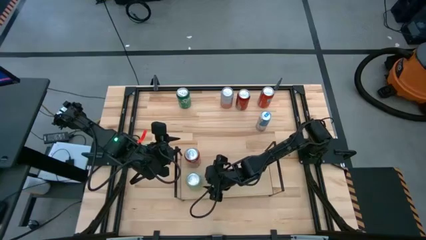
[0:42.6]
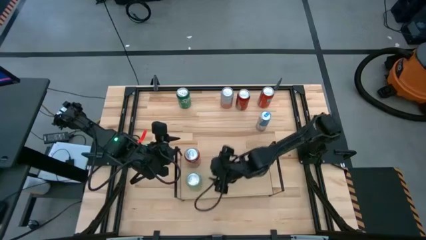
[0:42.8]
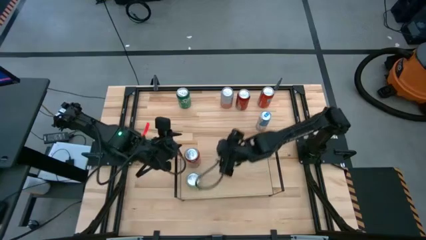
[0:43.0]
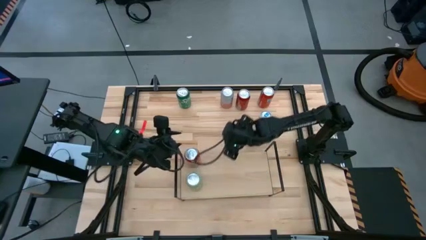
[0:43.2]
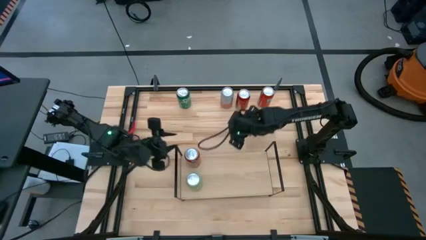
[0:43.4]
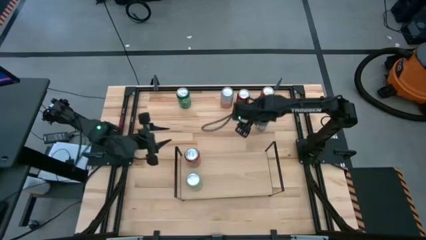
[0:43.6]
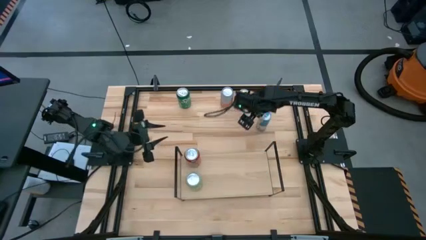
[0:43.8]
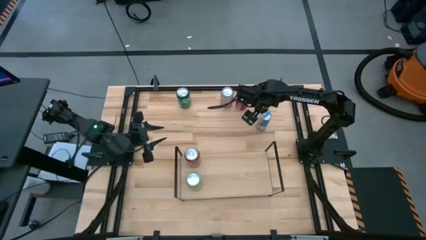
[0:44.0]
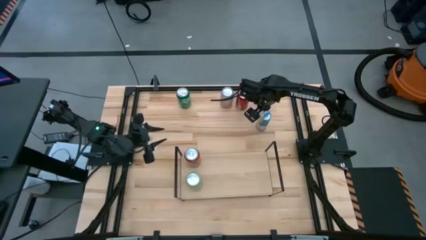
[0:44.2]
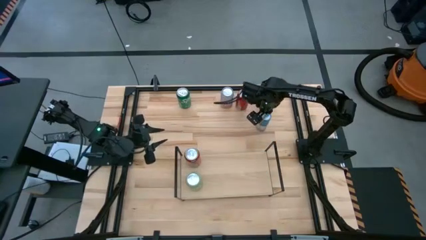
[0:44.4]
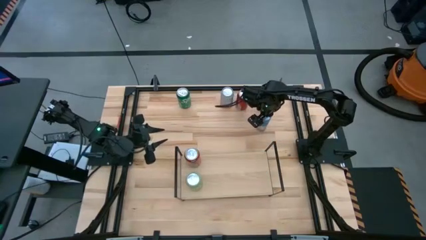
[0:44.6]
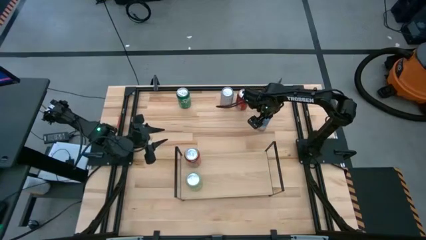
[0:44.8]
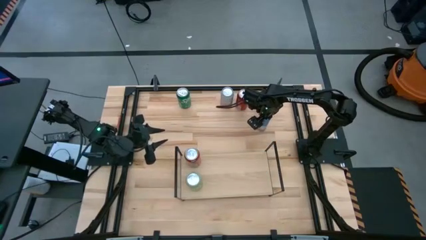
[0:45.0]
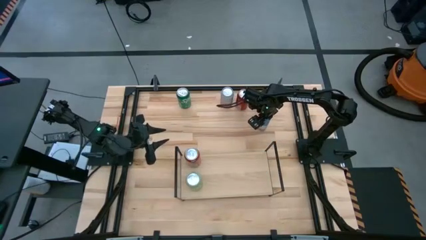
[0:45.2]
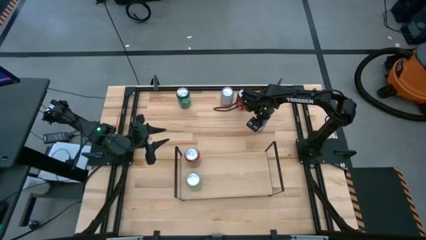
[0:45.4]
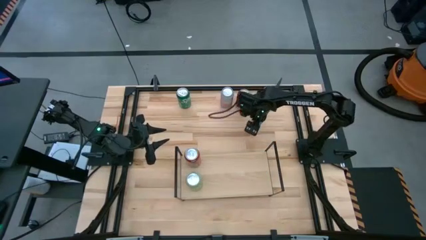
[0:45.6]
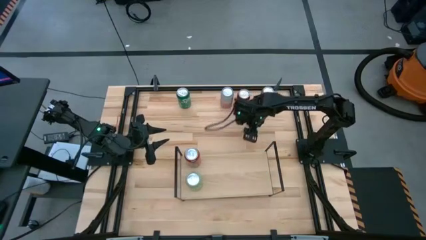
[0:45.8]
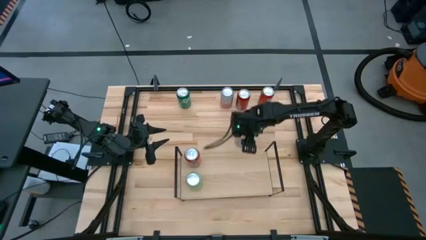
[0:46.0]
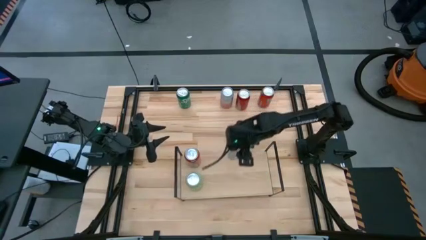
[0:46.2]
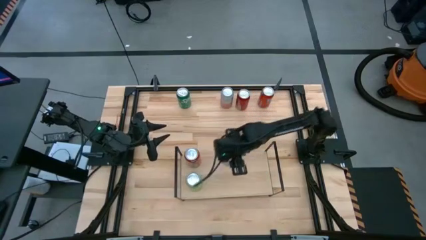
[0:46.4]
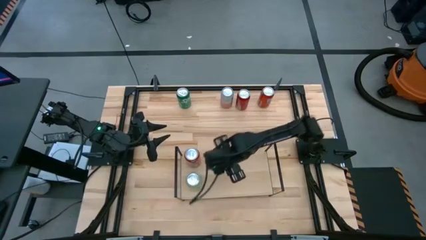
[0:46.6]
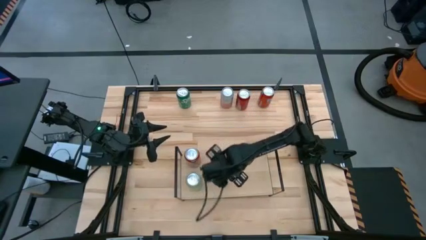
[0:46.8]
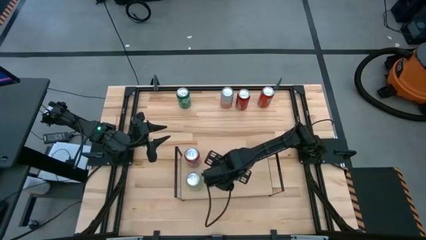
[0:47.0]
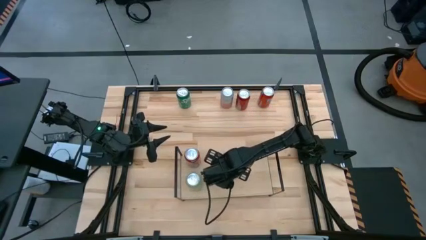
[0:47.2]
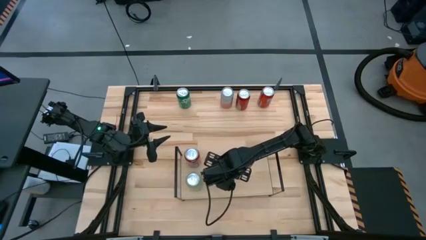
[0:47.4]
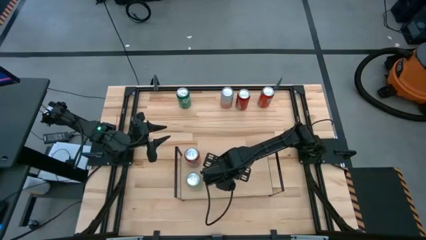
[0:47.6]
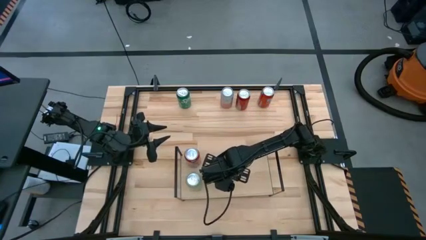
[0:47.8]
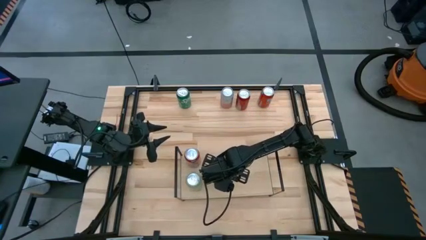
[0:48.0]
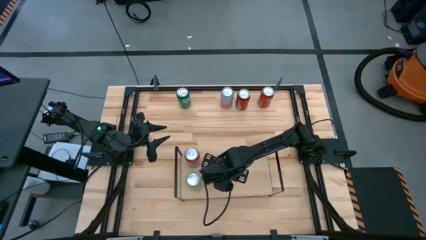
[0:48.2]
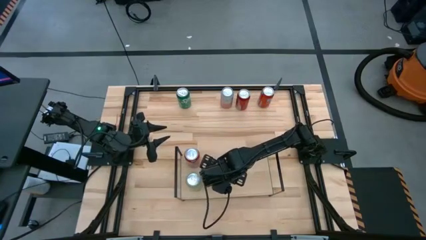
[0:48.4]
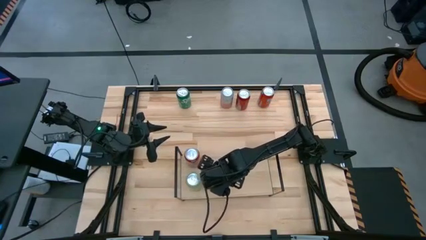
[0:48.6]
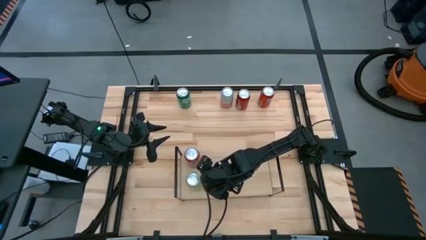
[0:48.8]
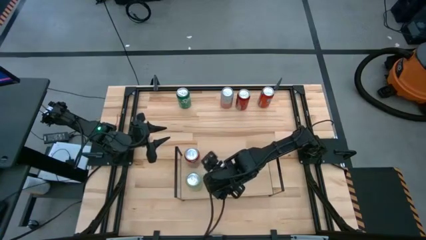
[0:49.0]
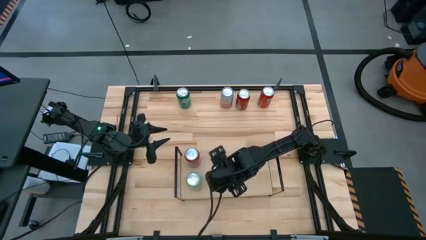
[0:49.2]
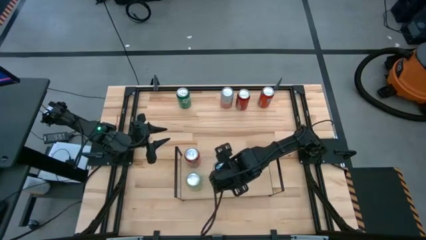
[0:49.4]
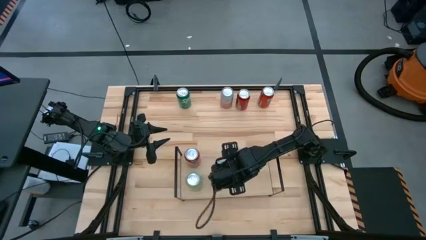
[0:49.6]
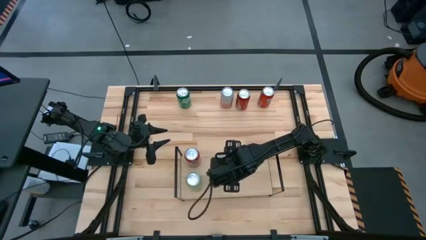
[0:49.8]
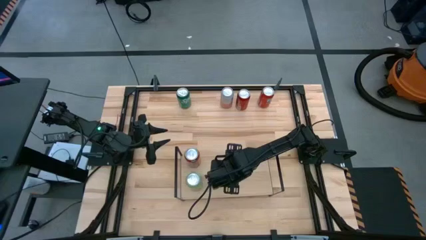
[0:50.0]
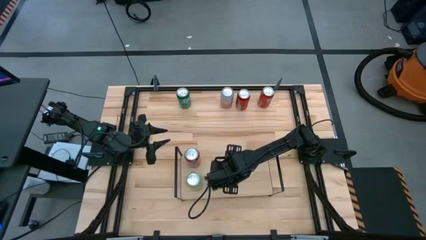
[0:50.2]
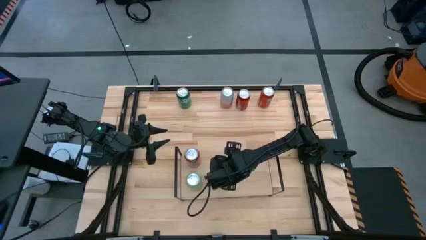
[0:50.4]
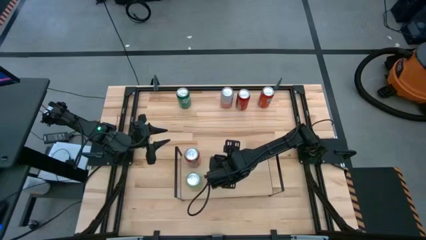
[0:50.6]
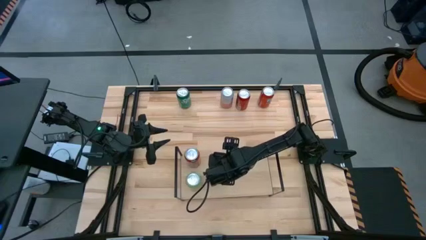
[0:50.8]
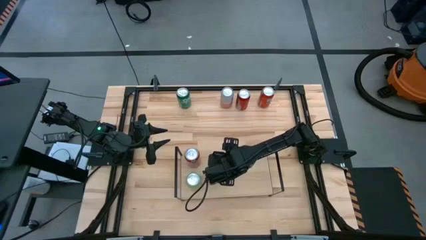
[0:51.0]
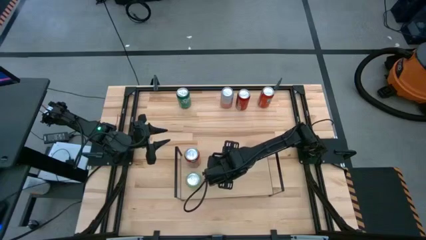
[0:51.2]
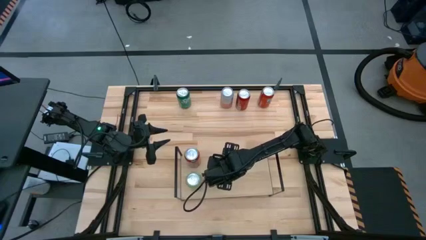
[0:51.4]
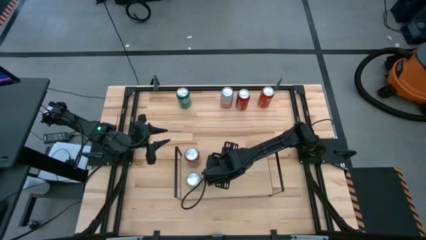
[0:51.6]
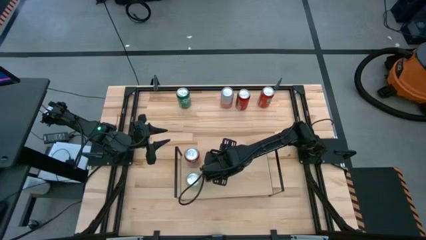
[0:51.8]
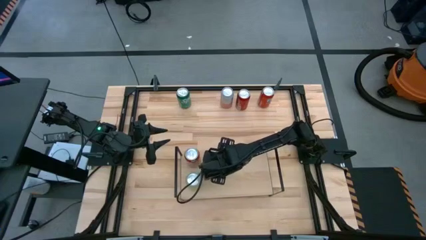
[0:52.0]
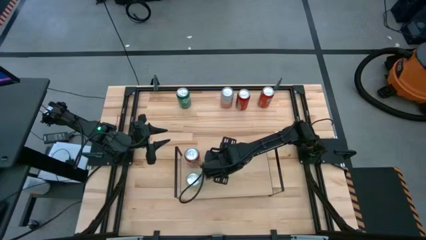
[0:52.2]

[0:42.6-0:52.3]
Task: Place canned beverage on shelf
Put the blue soda can on the shelf

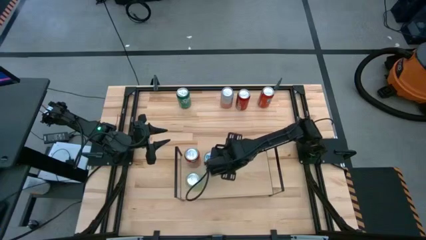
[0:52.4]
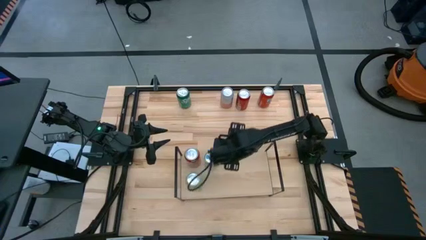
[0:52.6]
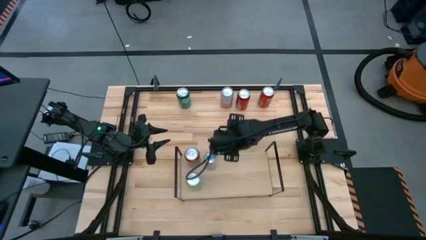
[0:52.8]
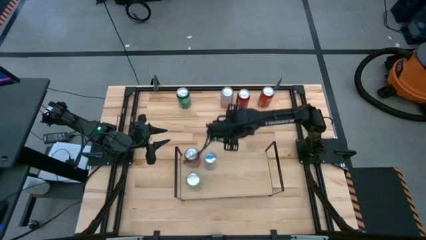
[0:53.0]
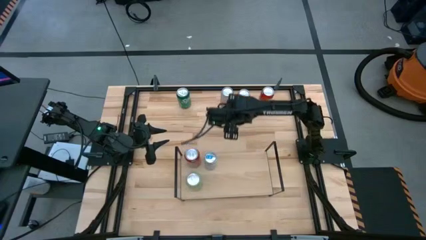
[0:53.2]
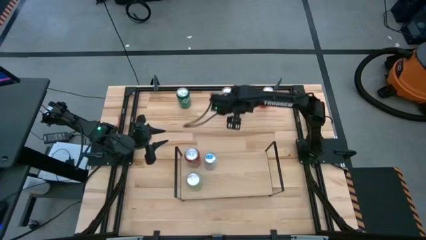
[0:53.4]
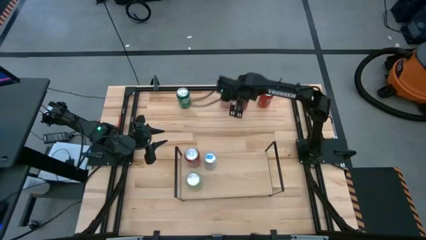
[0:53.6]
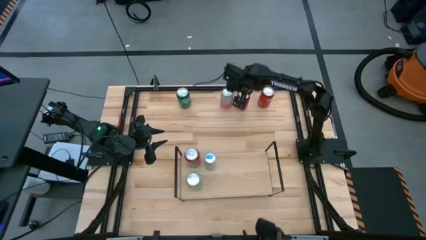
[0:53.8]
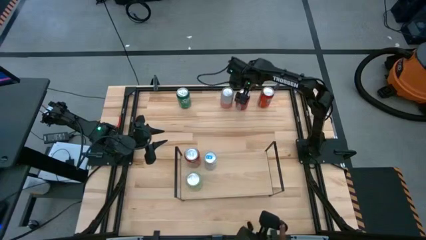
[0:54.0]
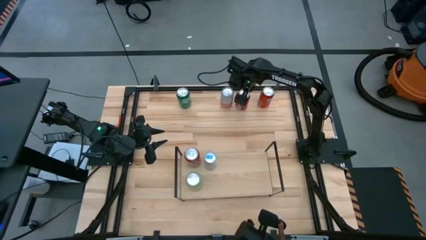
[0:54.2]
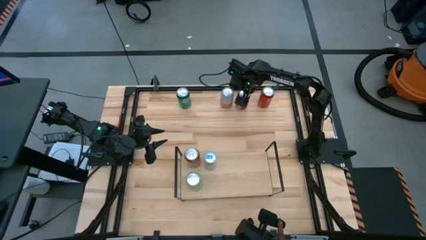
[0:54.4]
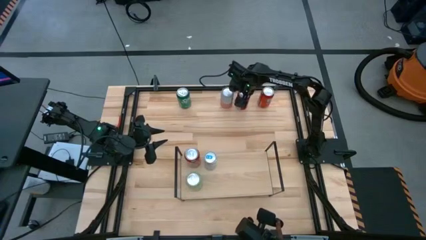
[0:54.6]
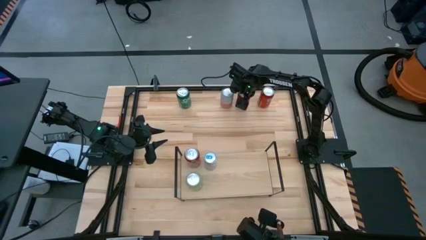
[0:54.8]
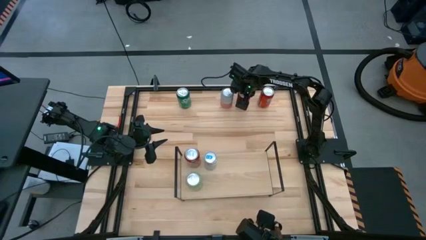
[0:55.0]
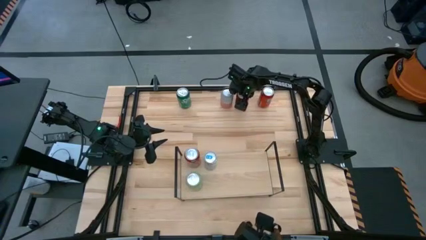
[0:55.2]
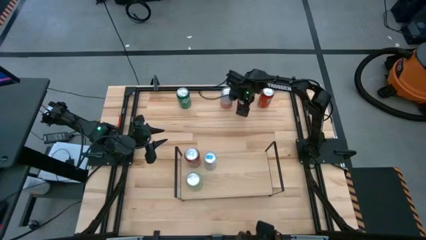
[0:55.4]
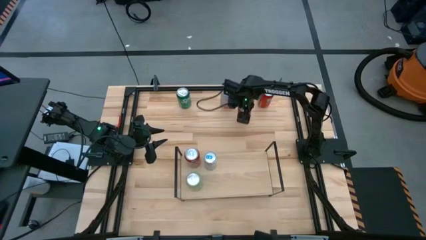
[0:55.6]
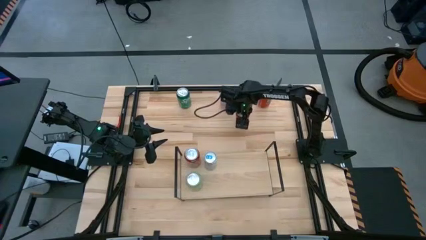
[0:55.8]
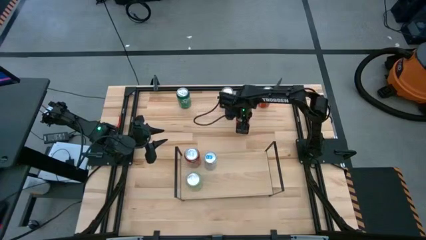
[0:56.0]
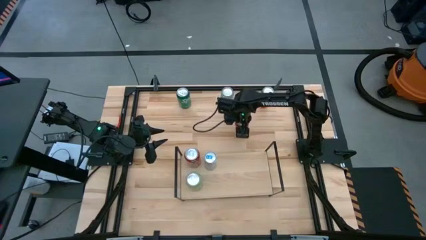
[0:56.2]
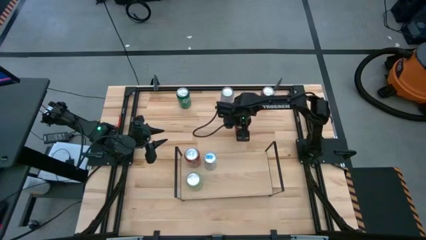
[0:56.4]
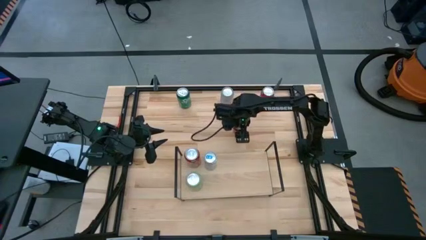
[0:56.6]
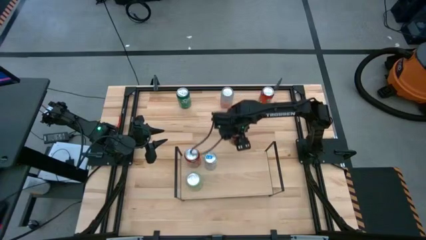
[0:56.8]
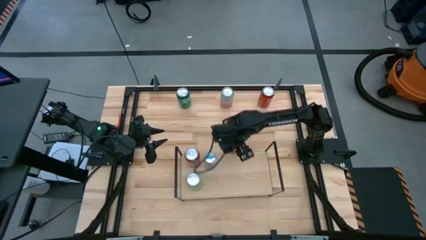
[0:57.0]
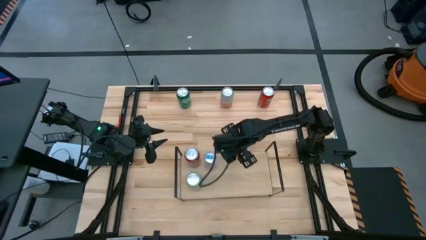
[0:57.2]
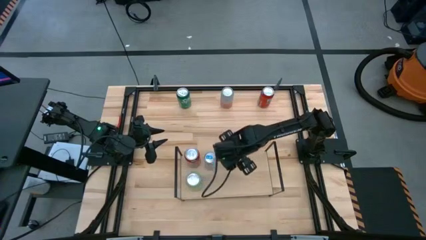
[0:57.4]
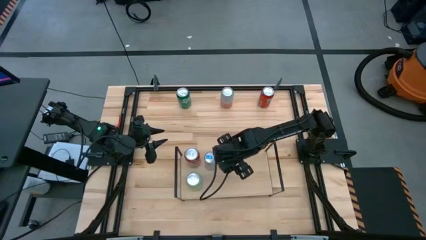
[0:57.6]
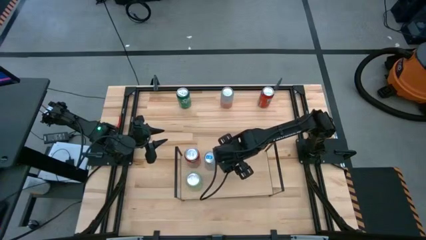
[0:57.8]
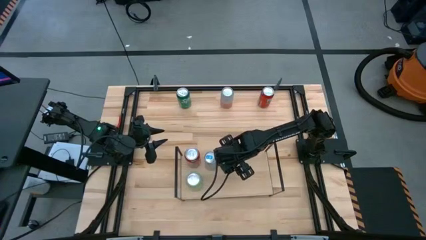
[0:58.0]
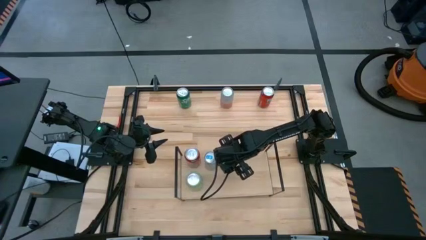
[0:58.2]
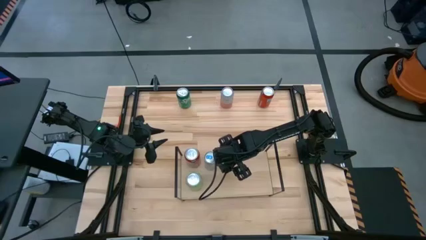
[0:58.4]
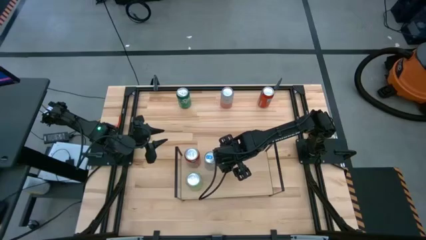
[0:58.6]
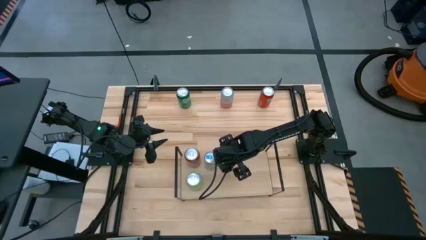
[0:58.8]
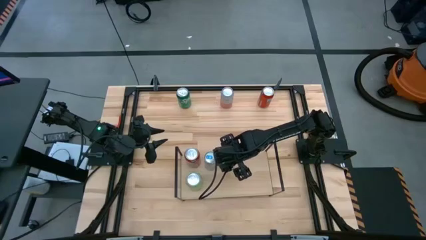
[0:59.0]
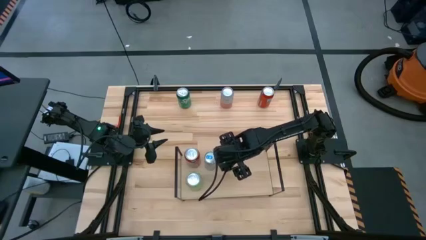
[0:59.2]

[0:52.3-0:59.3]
Put the red and black soda can on the shelf
